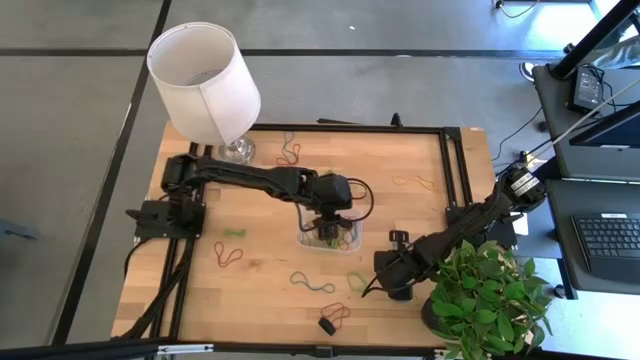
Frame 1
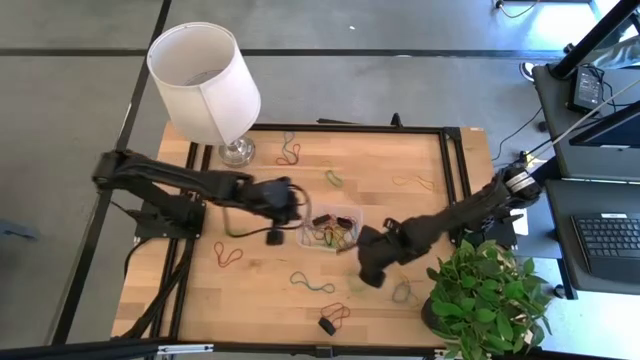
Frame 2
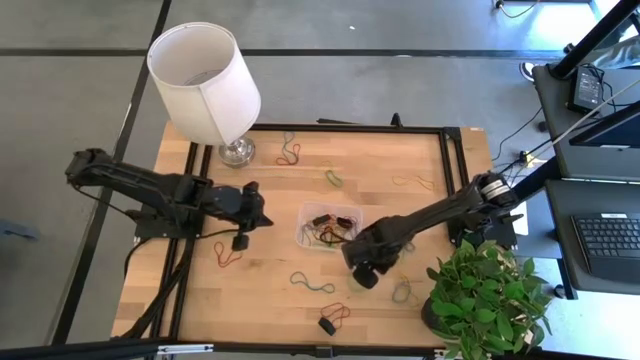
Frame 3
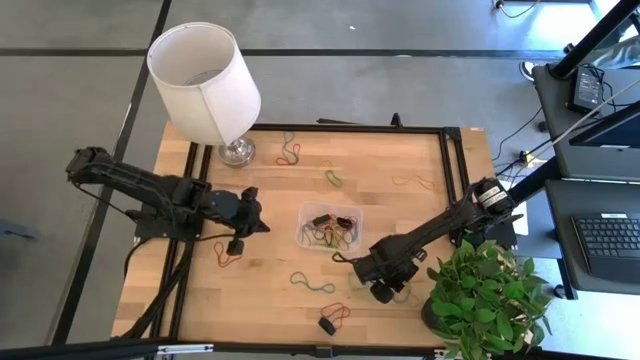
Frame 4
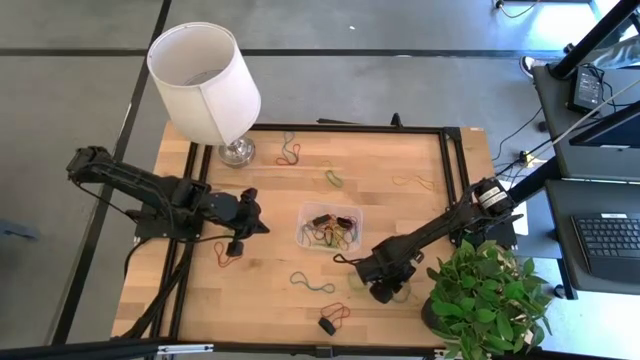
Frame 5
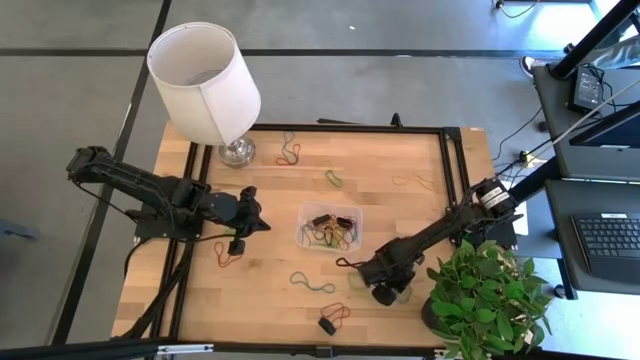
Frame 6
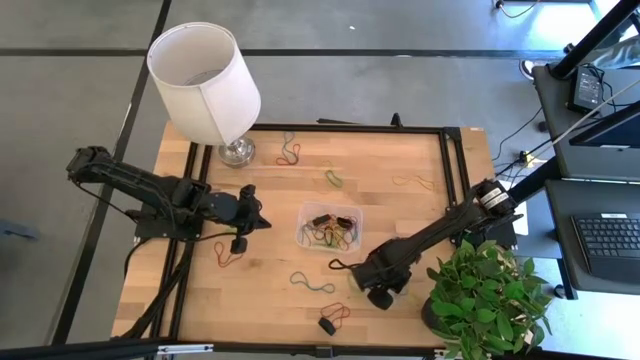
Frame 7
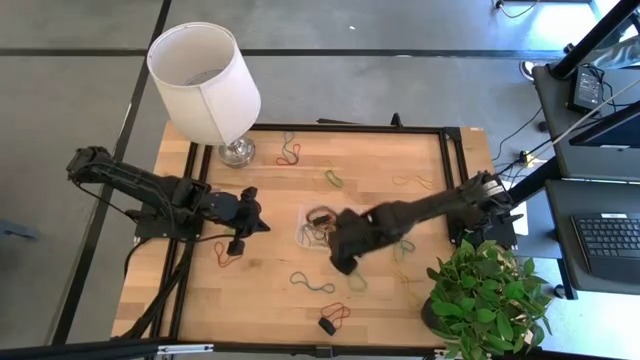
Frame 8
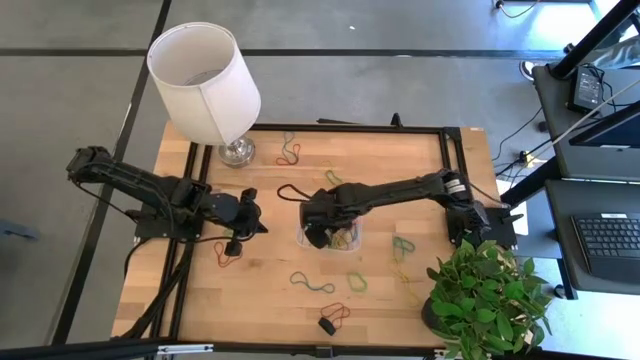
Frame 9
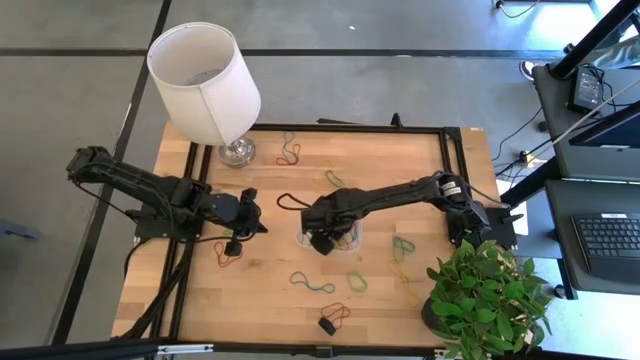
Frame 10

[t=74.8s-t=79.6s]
Task: Pick and place rubber bands into bin
Put the blue rubber band into the transparent bin

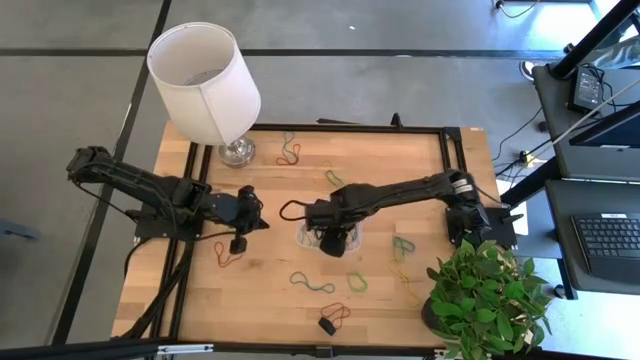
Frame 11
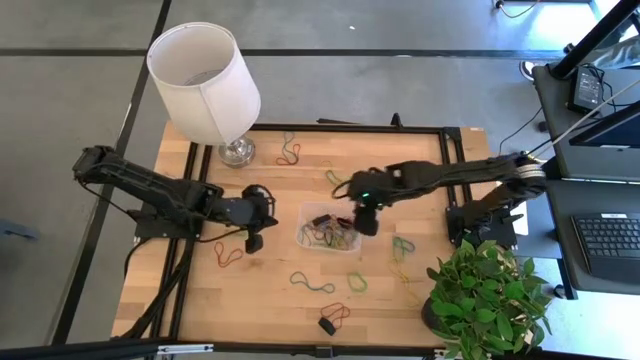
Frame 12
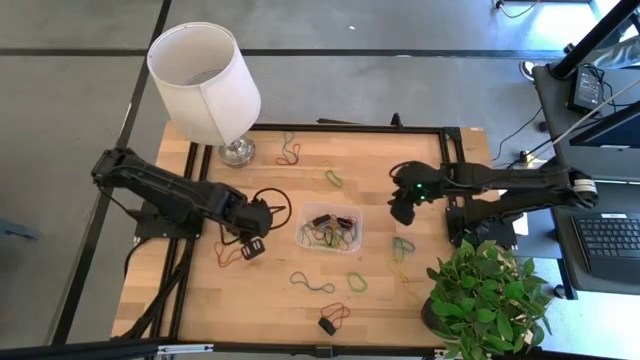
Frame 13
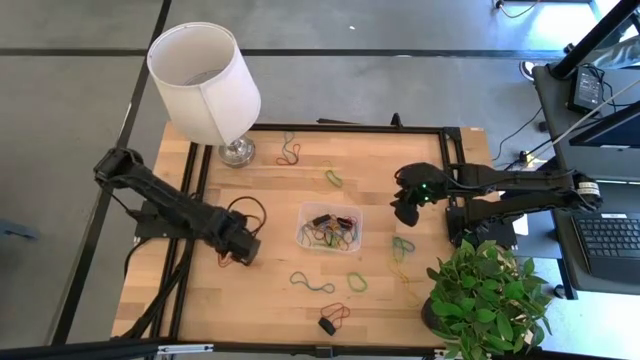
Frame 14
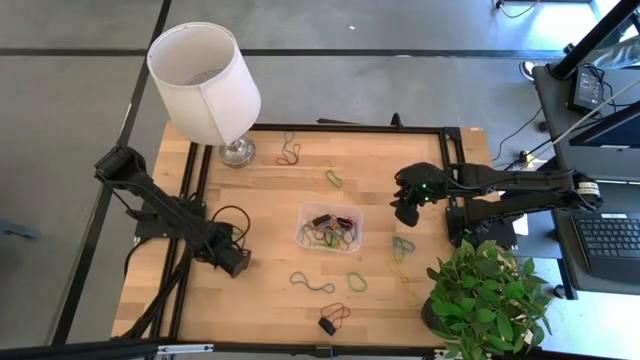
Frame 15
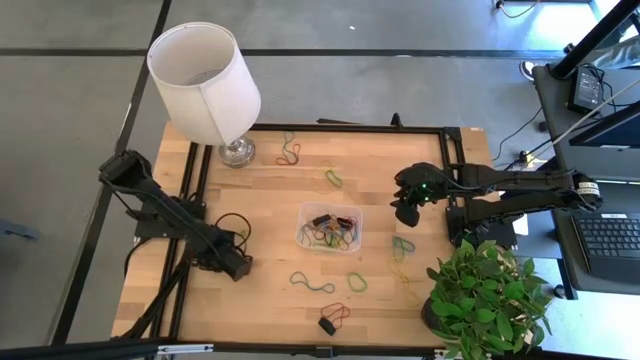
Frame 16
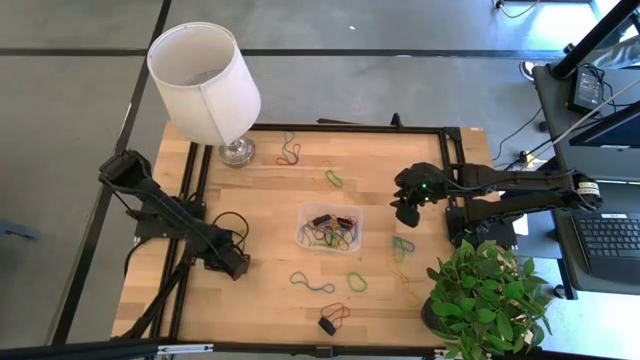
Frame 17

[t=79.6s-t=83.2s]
Put the red rubber band into the transparent bin

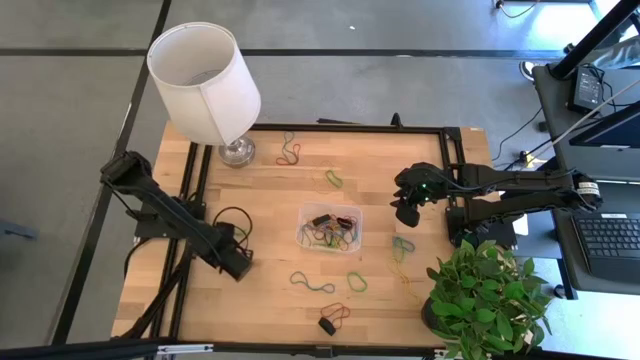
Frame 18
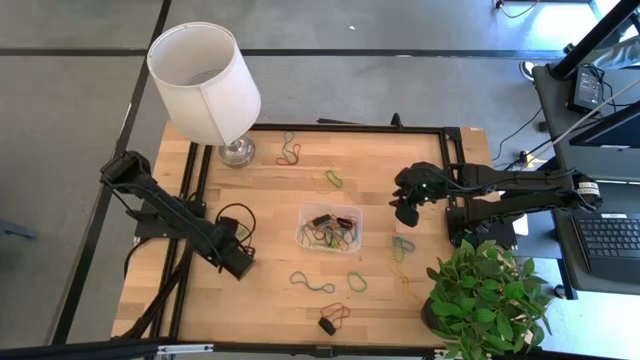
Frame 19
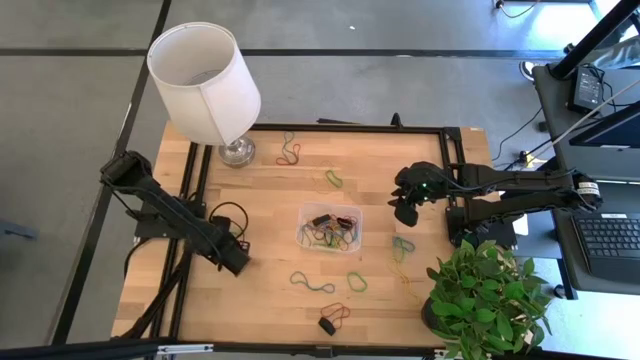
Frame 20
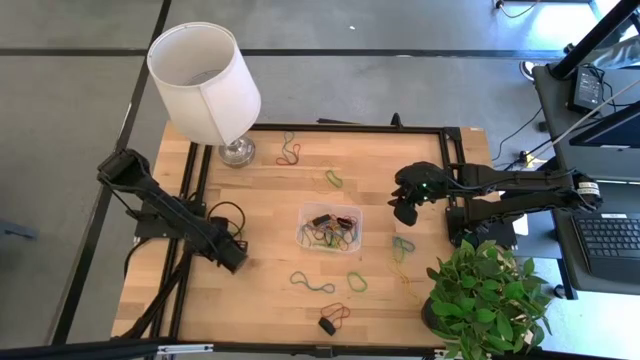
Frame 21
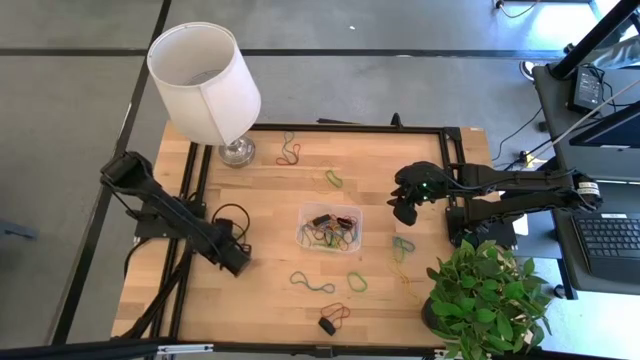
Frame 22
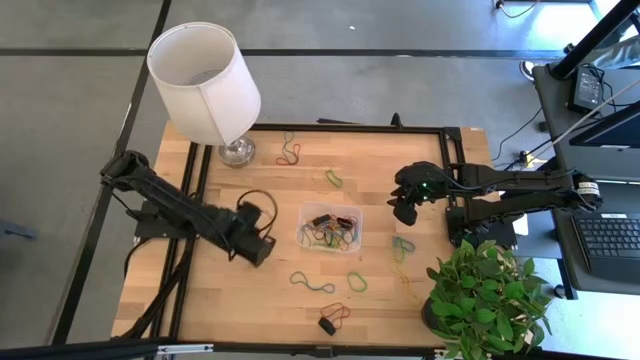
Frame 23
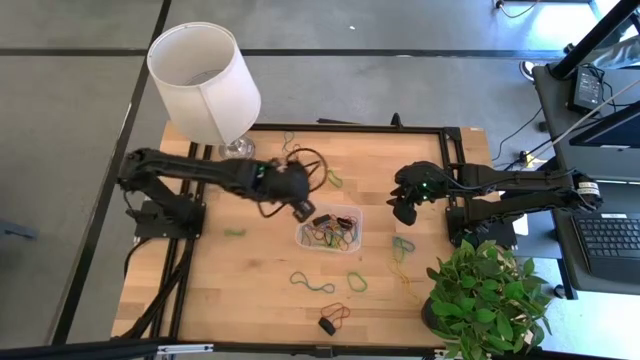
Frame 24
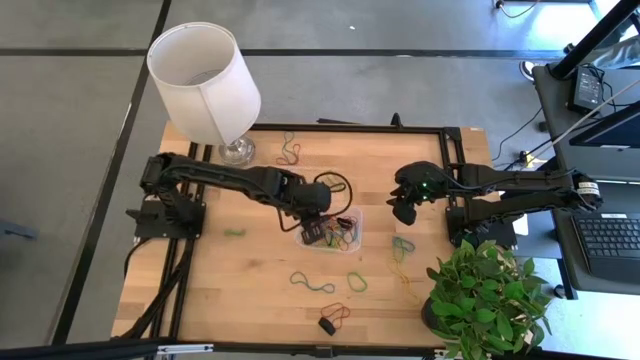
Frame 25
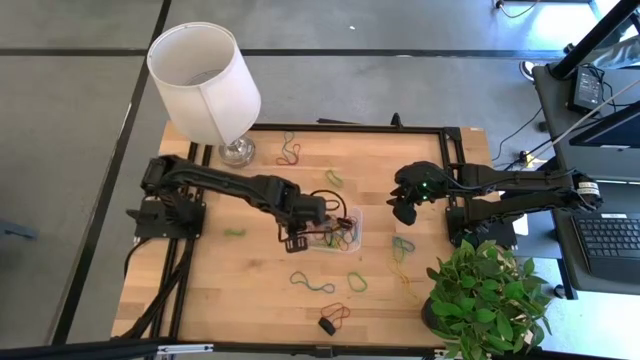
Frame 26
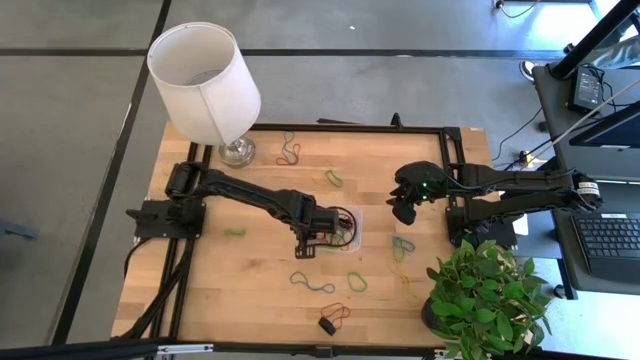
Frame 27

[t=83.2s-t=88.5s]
Put the red rubber band into the transparent bin

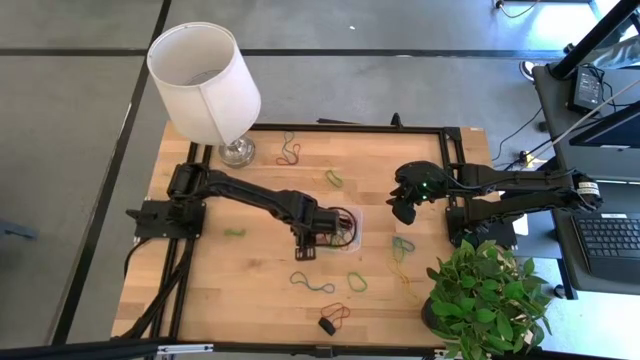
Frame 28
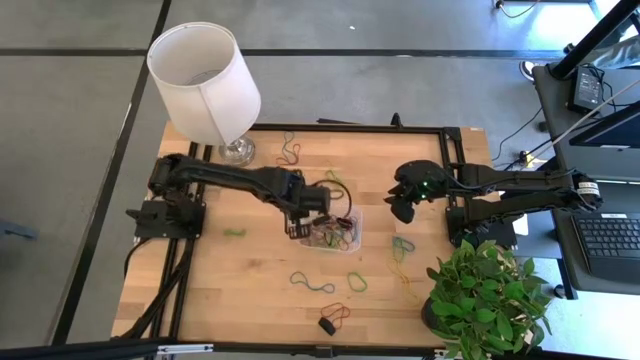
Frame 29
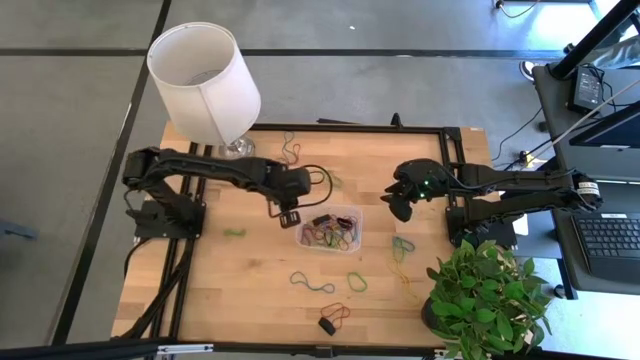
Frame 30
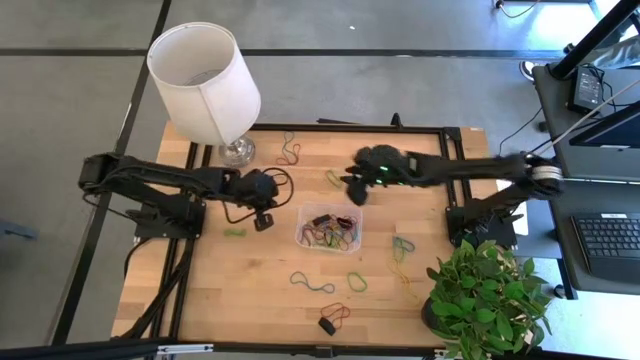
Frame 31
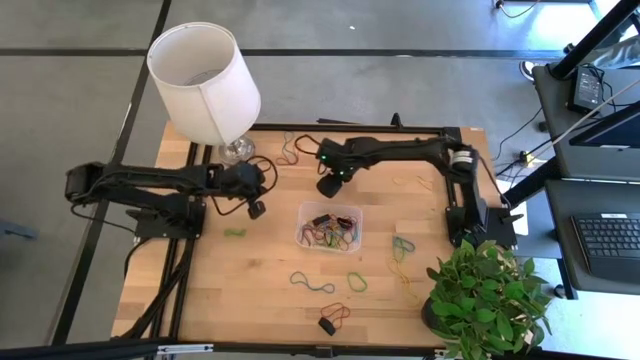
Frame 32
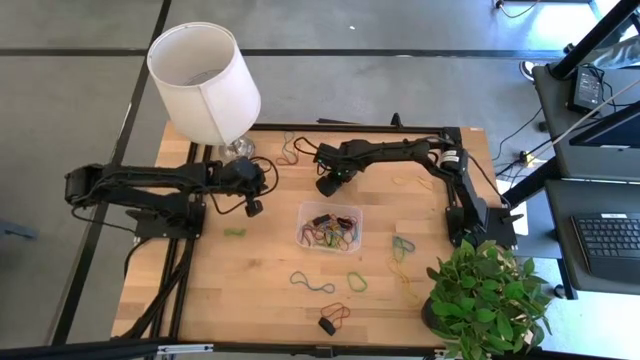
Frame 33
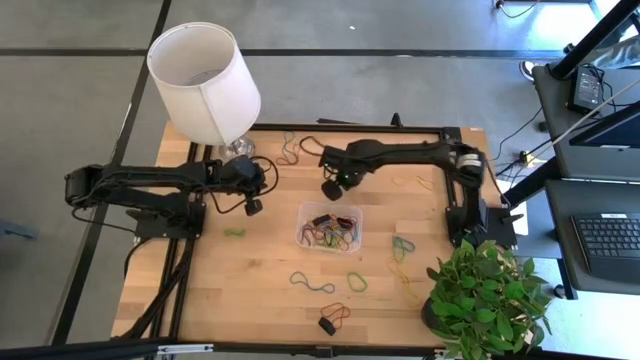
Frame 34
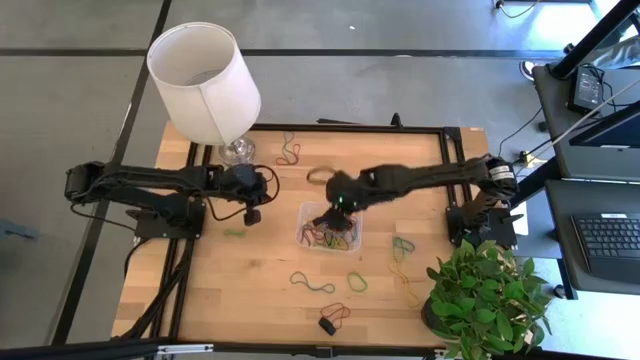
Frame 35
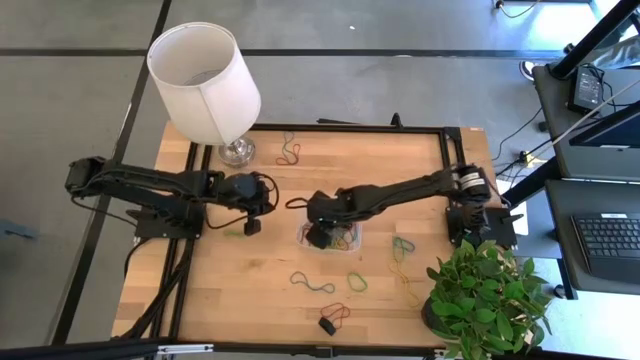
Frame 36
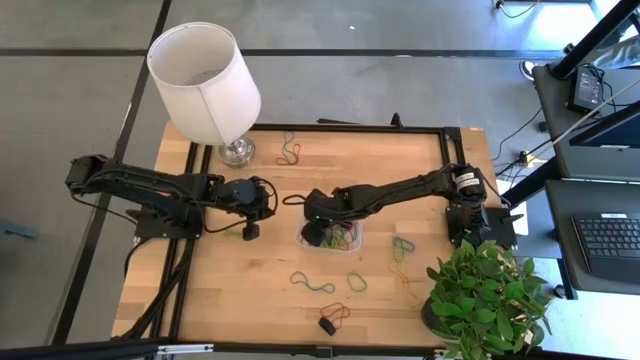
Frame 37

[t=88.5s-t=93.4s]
Put the green rubber band into the transparent bin

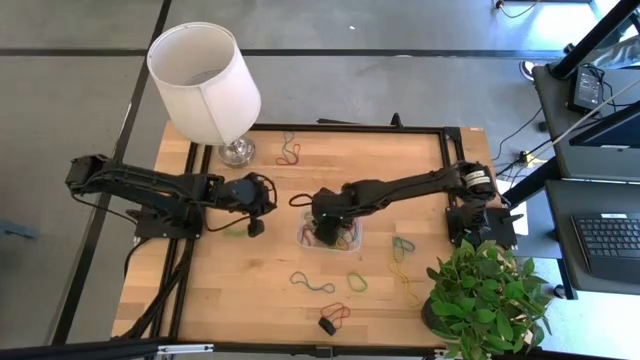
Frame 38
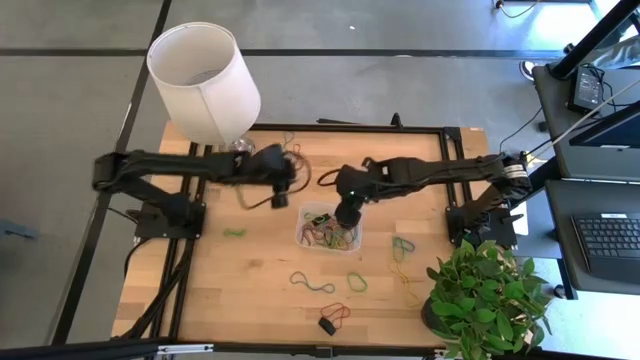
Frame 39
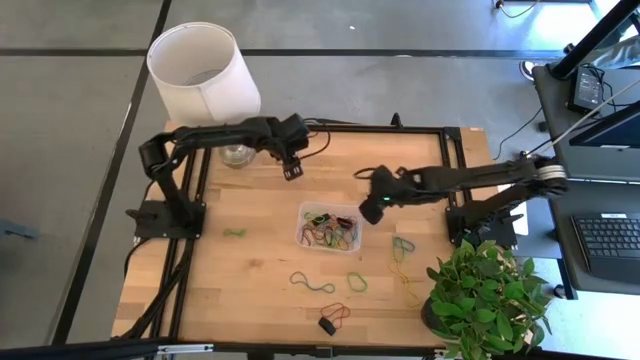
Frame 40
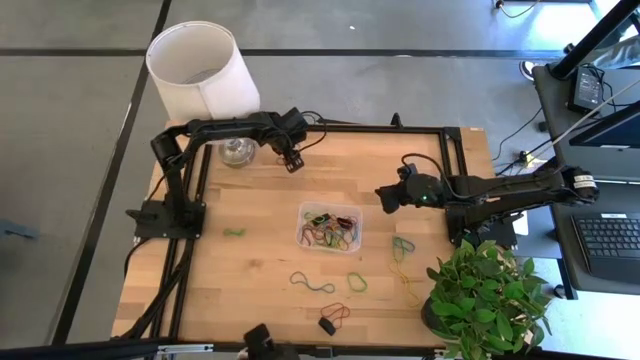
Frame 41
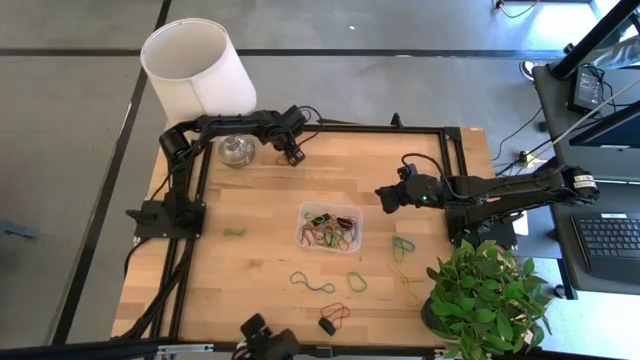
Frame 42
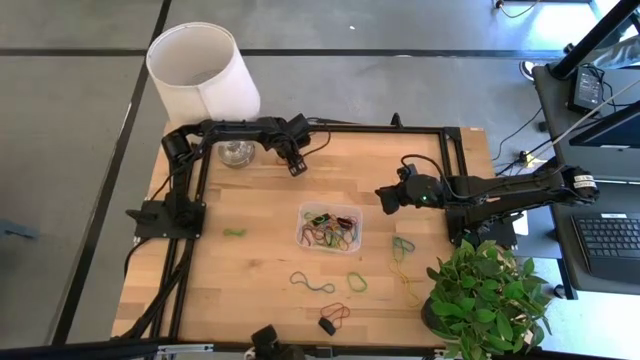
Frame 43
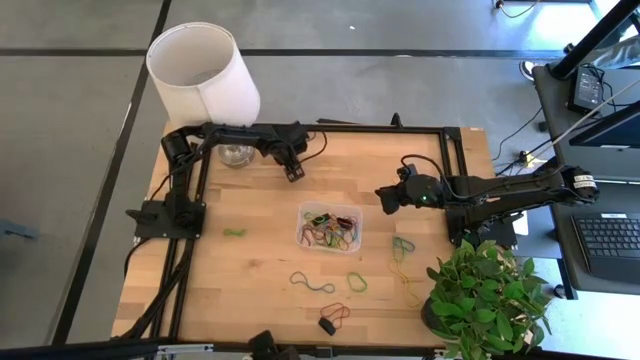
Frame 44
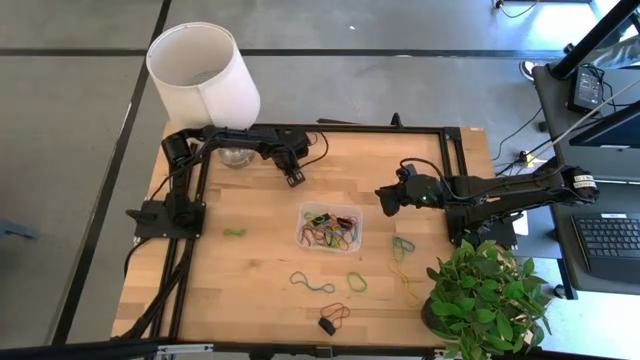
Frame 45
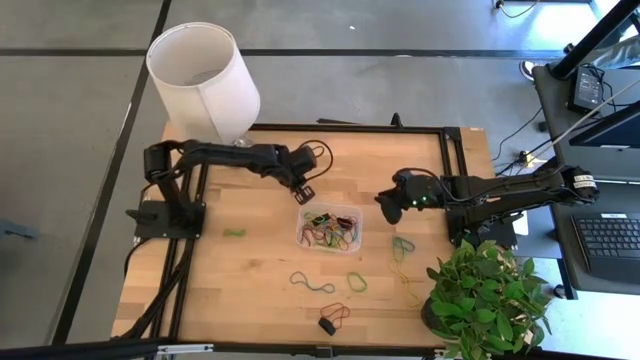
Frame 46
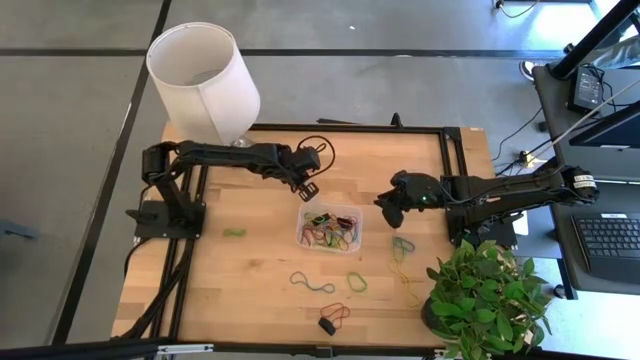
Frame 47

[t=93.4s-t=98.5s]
Put the blue rubber band into the transparent bin
